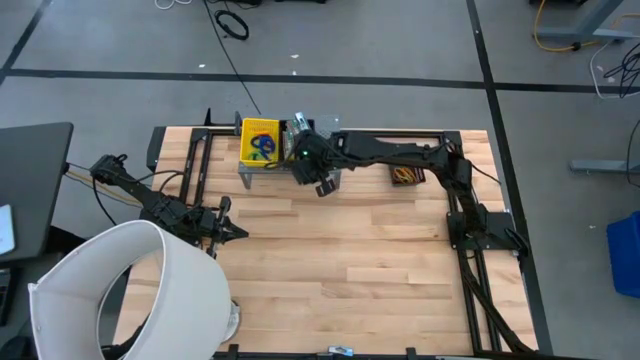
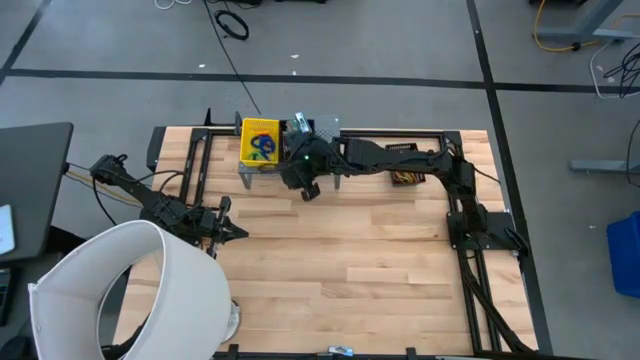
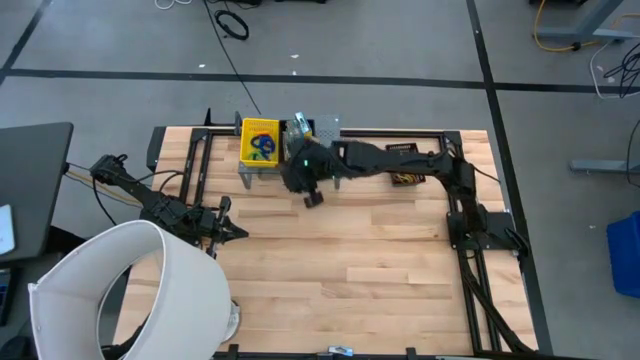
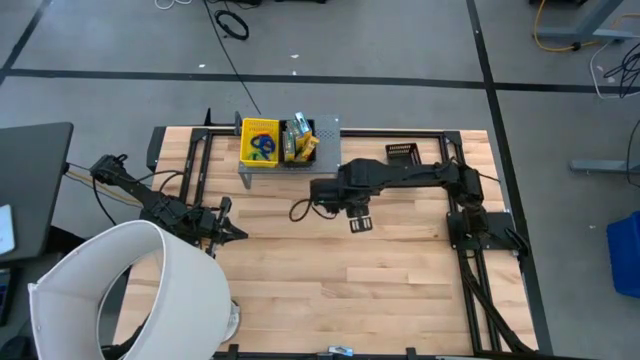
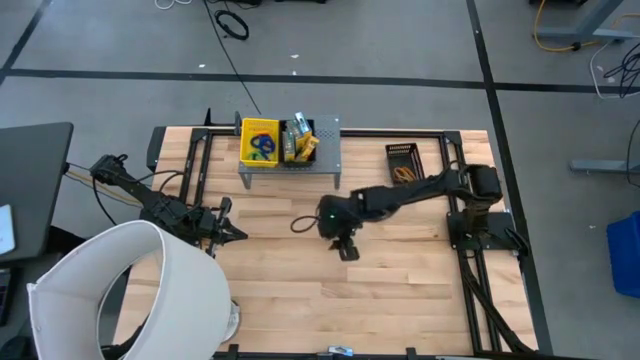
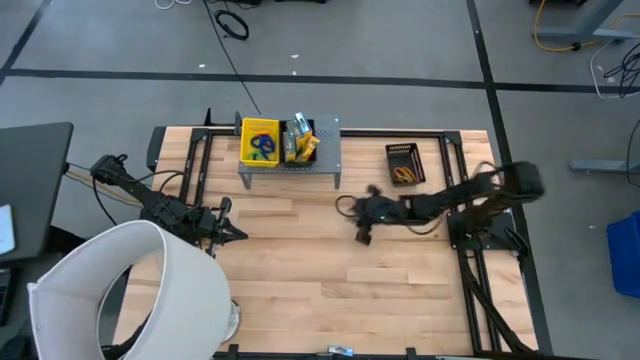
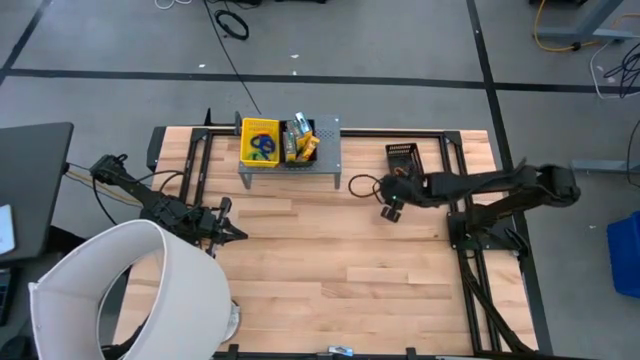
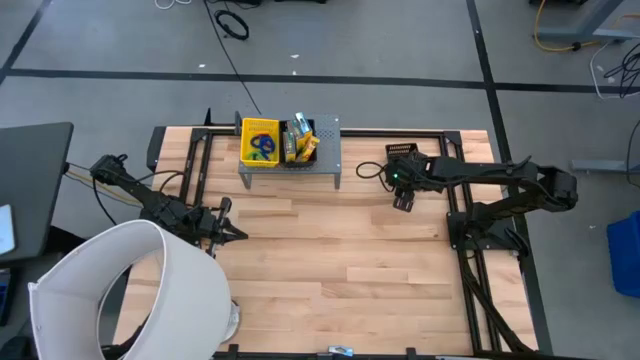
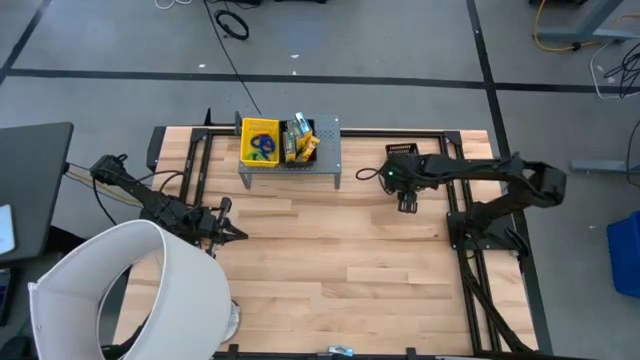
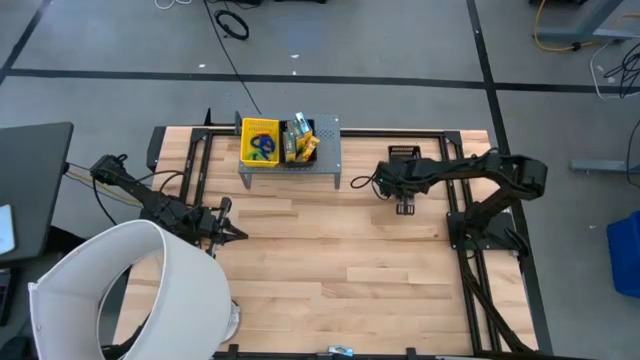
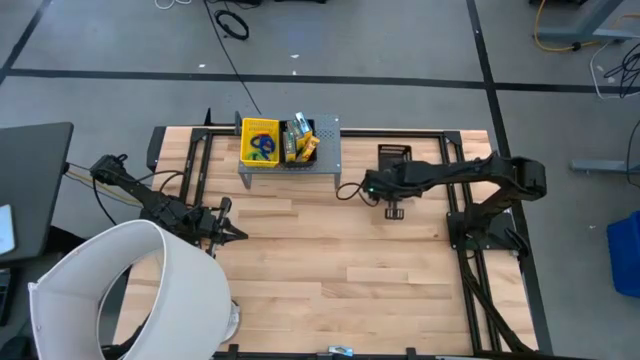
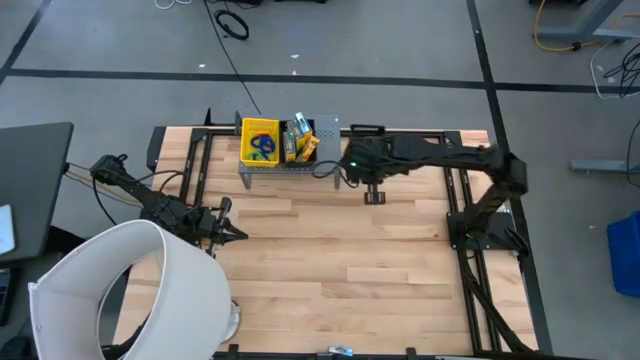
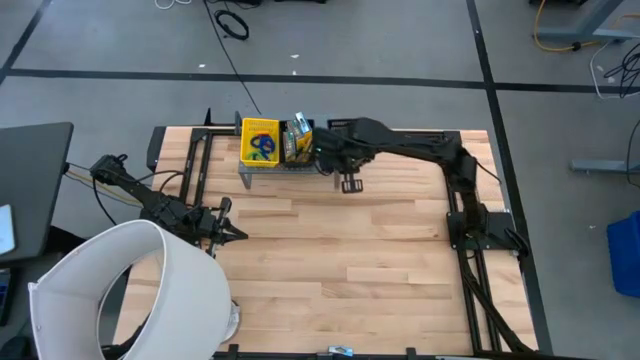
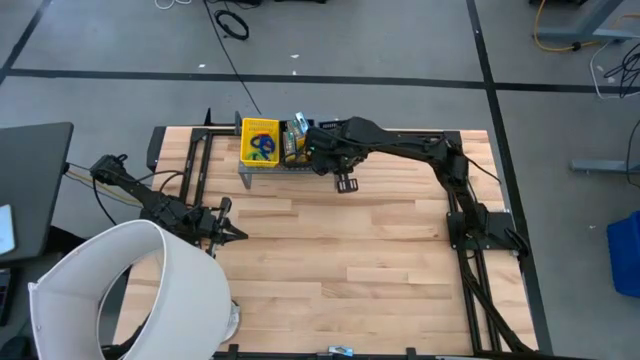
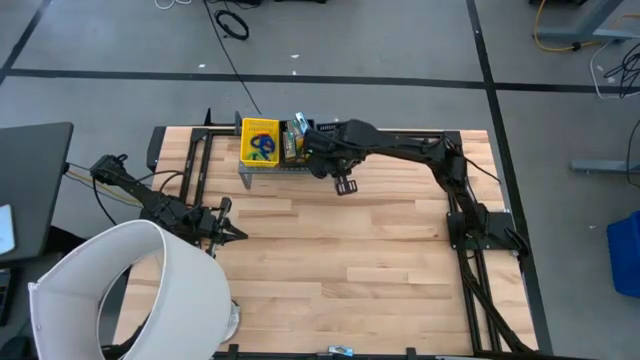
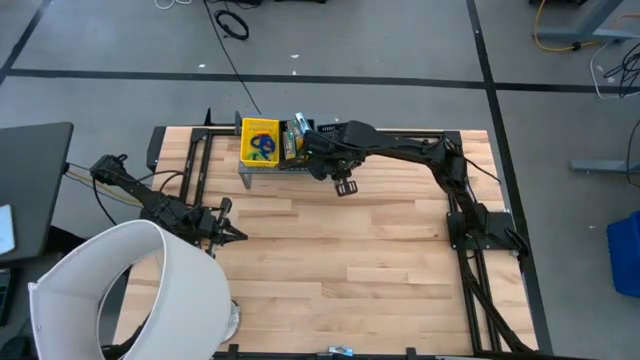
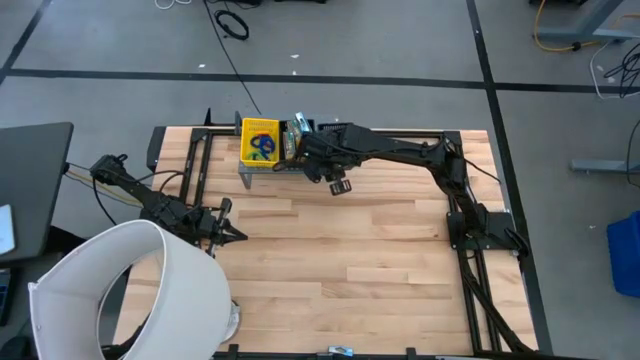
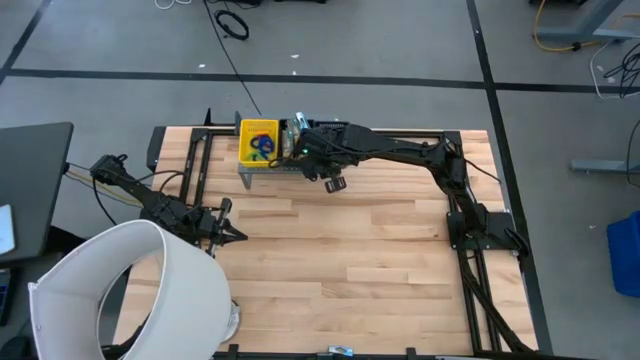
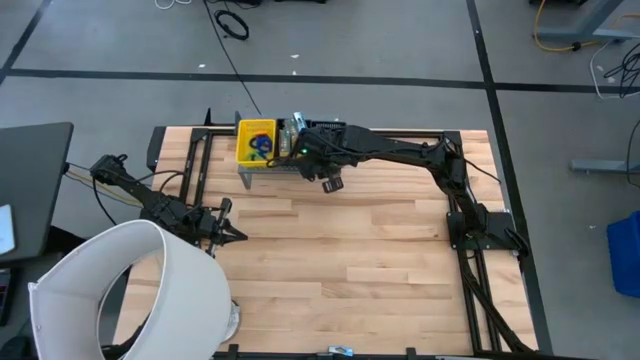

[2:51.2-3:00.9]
Task: Pick & Place Office Desk Supplies
Put the black bin on the shelf

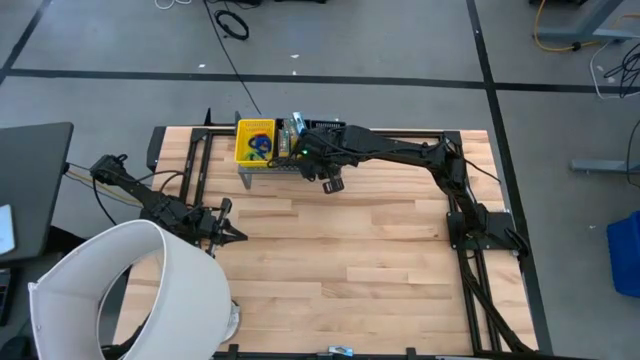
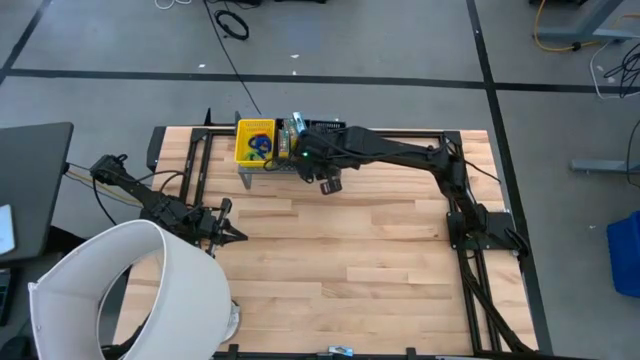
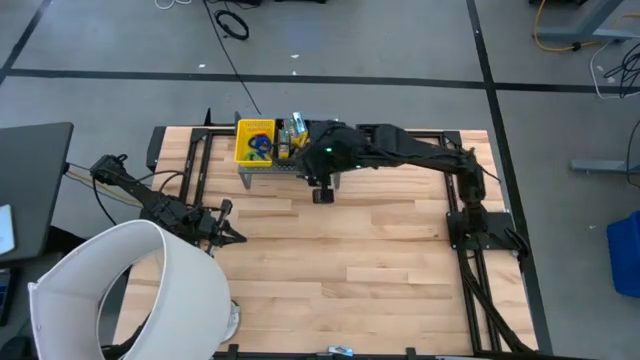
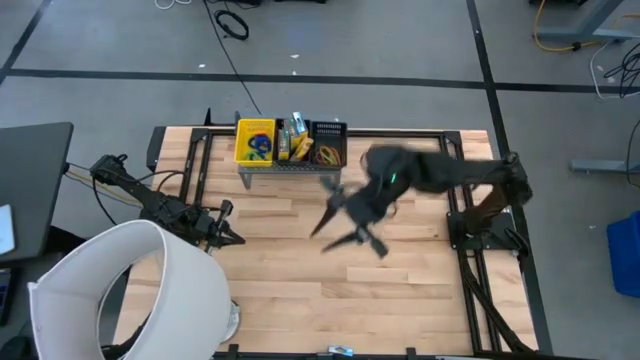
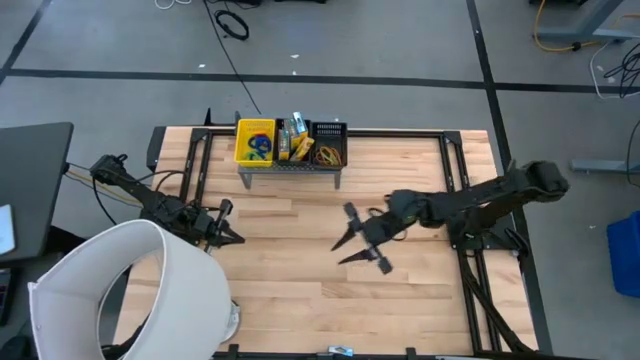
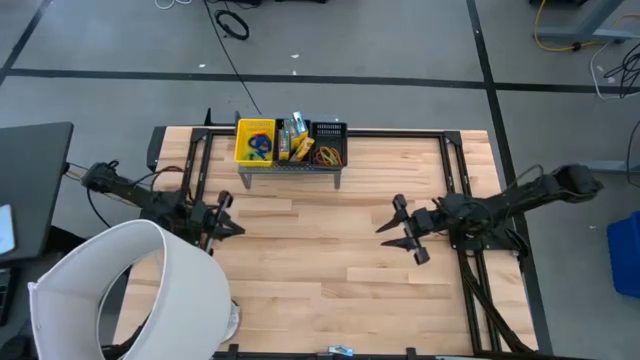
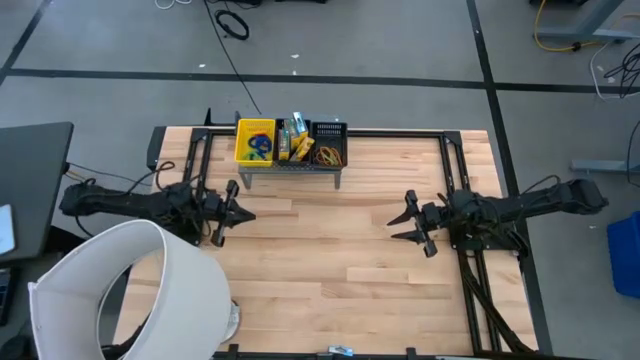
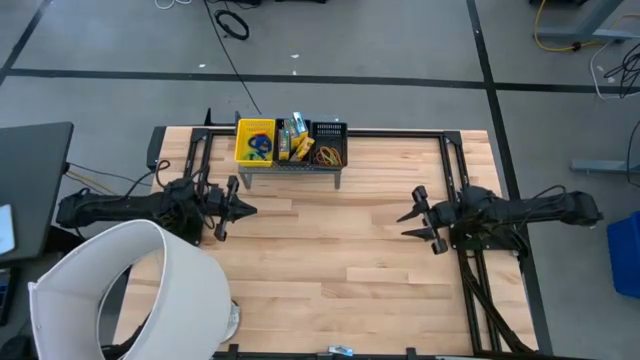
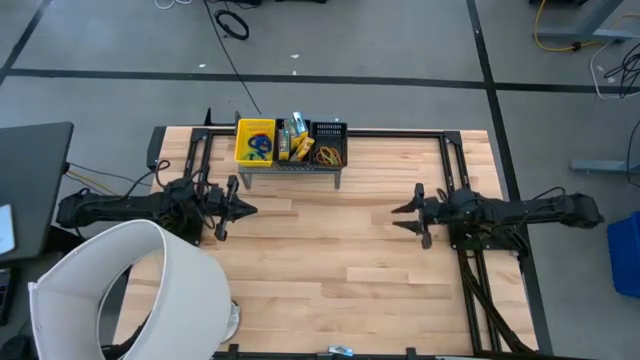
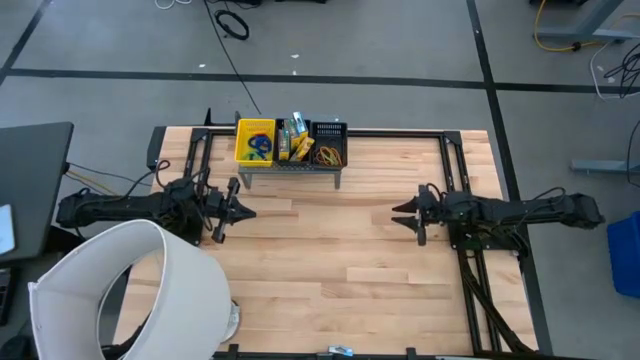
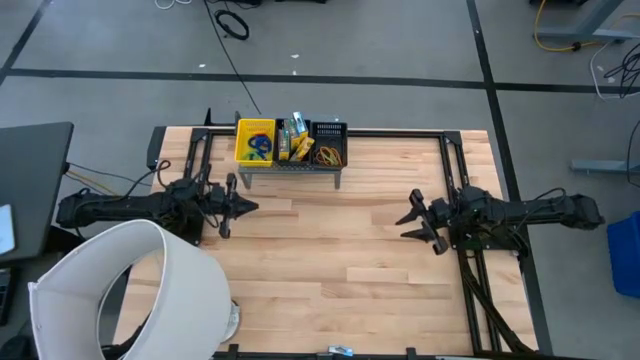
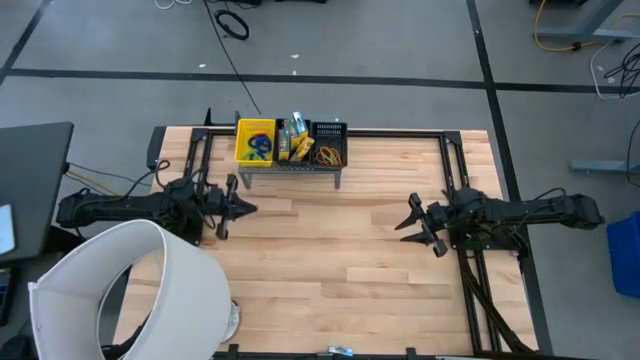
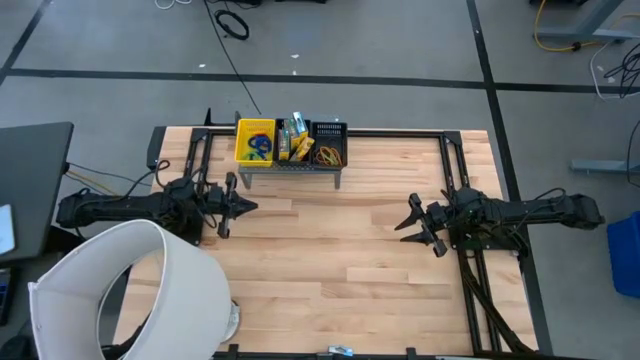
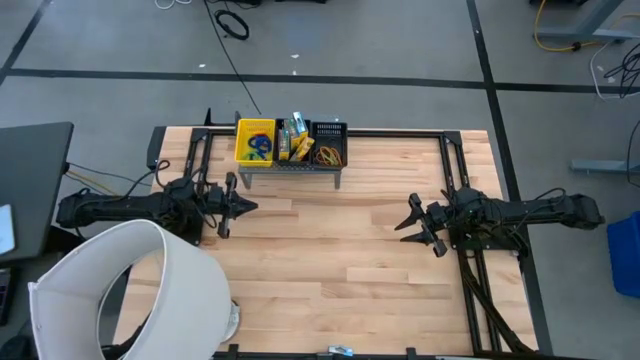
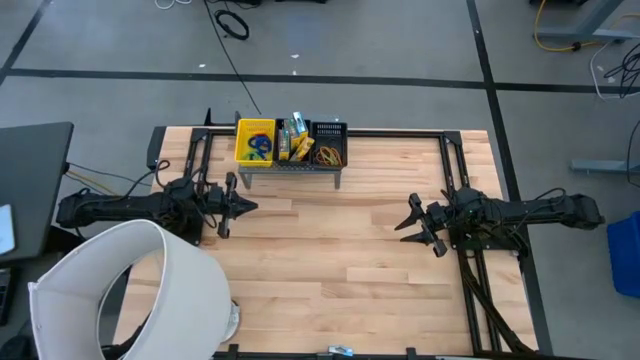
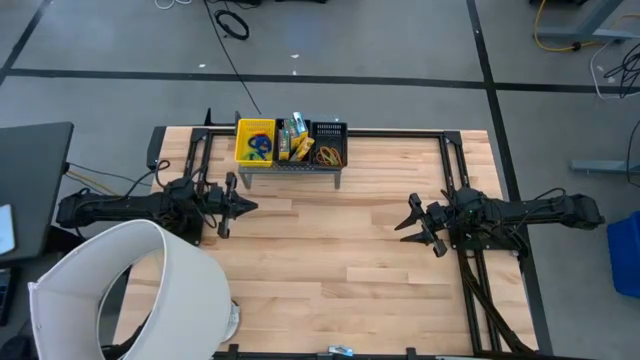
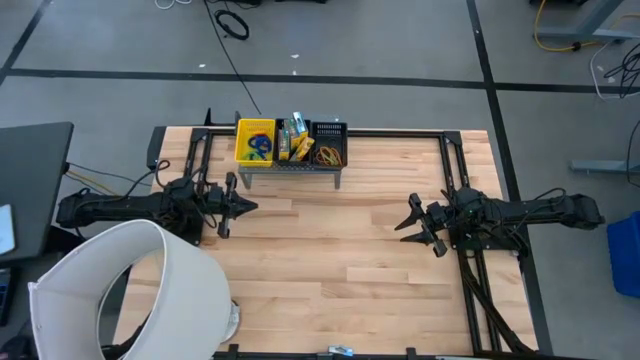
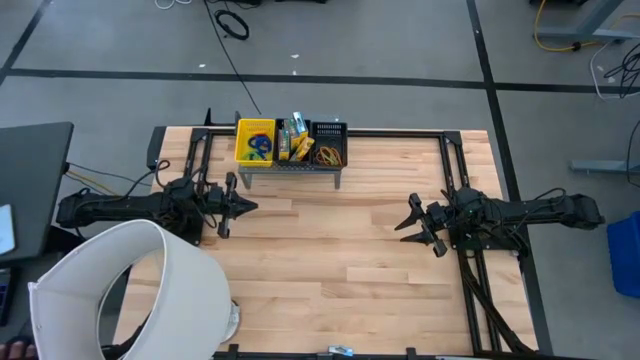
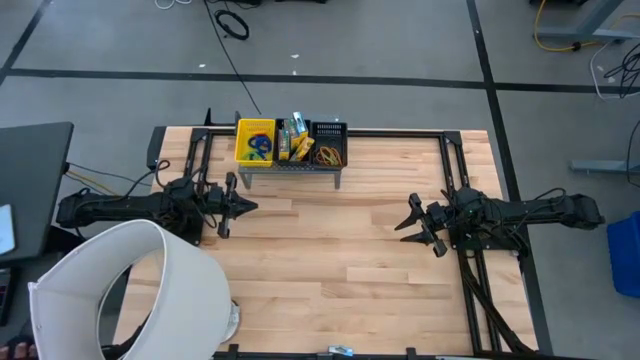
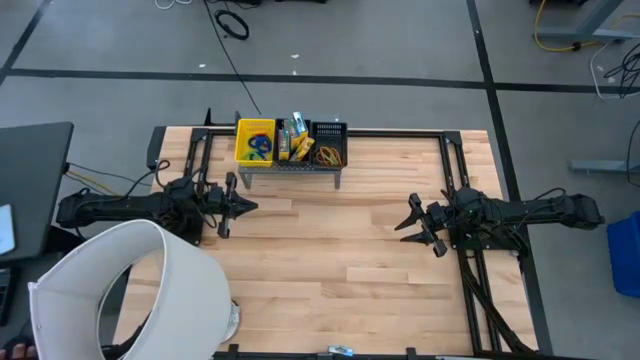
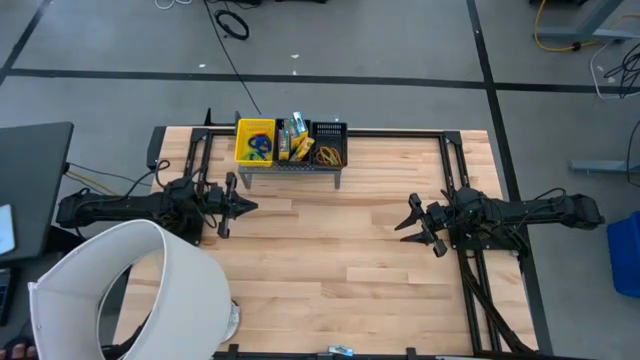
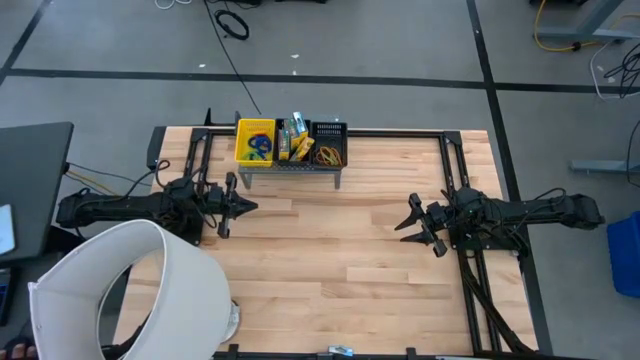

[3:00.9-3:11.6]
Return to Home Position
